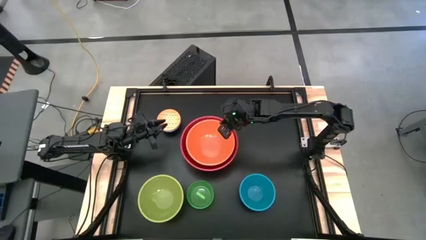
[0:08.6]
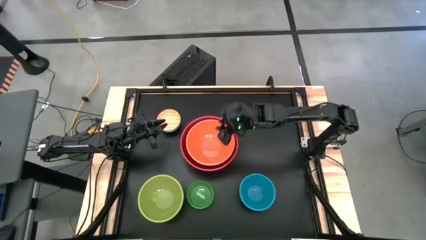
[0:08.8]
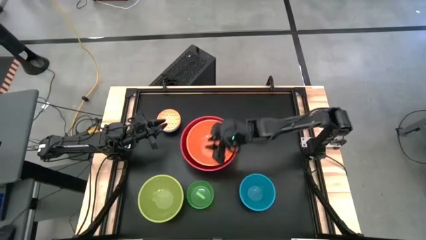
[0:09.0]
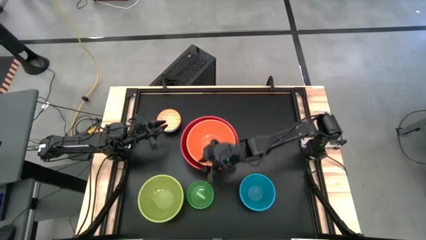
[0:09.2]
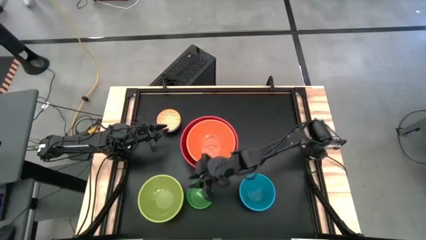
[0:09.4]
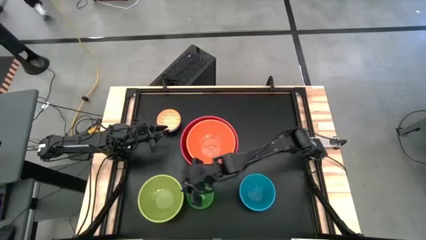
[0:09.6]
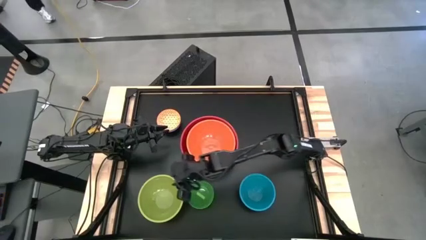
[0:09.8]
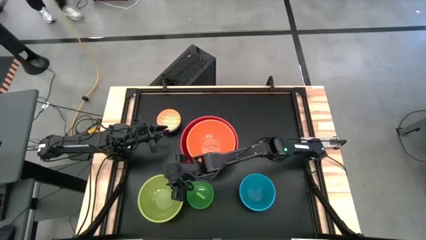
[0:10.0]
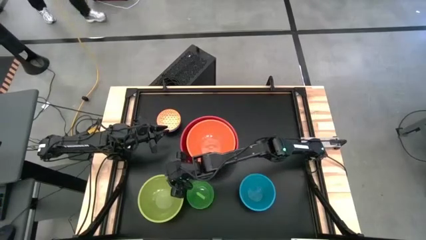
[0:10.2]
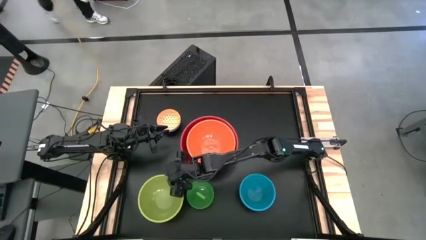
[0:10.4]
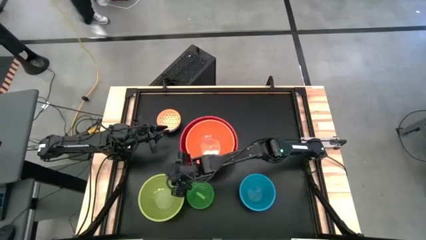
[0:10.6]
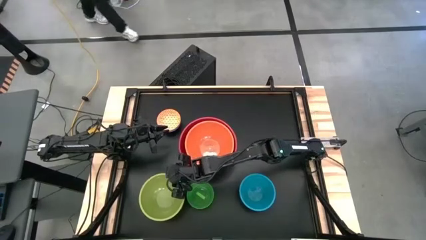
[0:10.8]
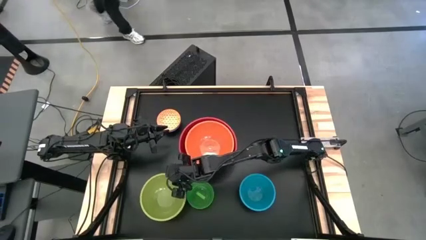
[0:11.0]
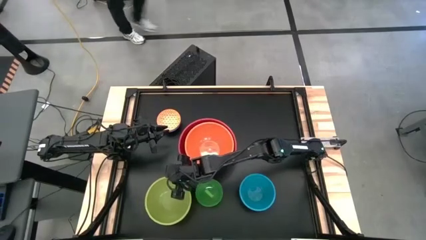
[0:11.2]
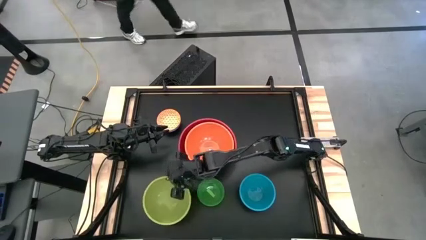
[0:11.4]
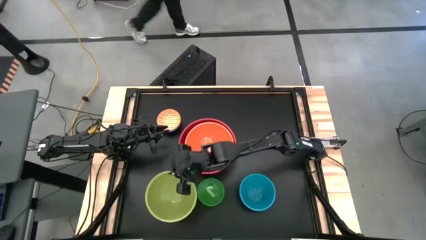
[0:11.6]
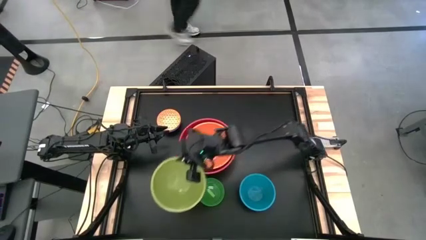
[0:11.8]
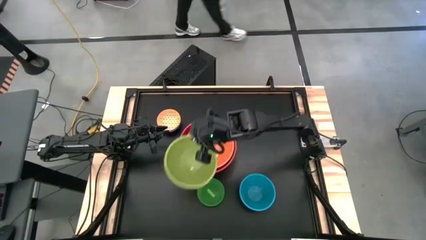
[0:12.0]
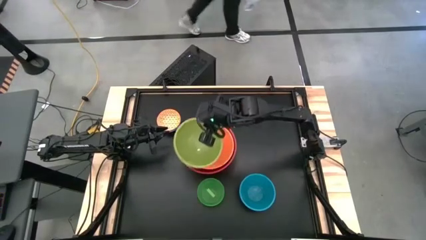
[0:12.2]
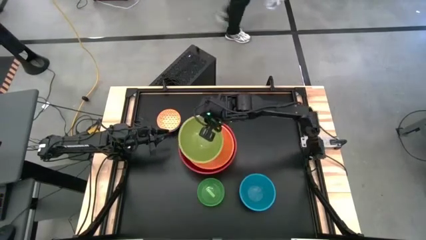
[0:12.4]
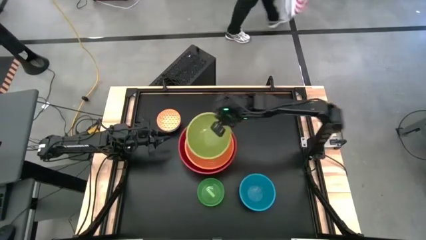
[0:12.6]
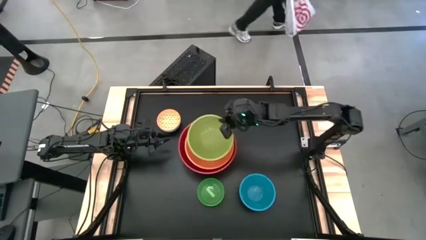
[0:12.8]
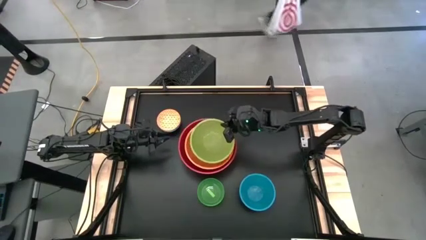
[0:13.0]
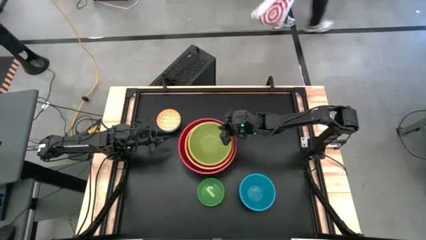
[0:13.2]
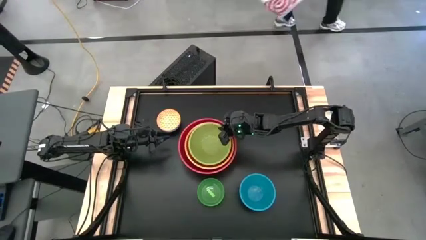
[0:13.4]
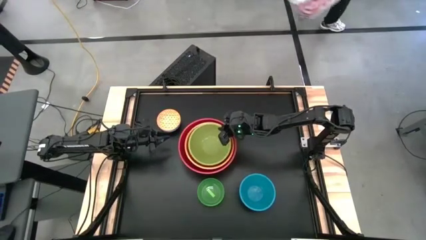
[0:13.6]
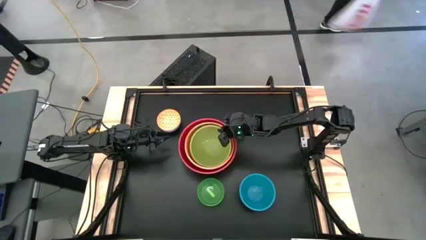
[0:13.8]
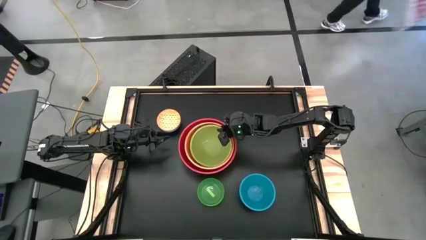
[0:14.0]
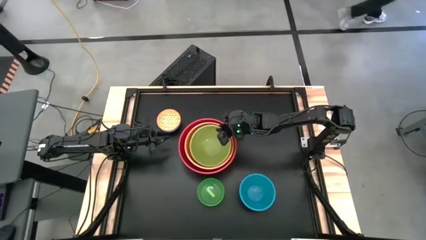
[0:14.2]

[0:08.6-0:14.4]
Stack the green bowl on top of the orange bowl

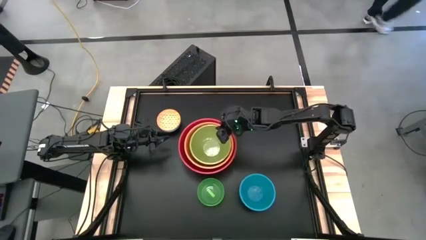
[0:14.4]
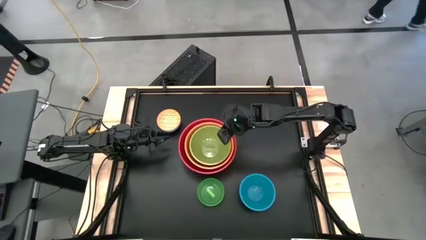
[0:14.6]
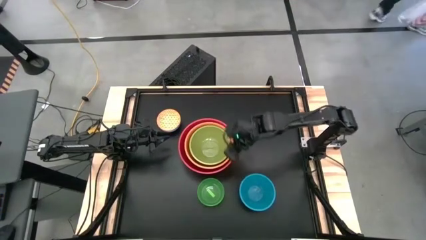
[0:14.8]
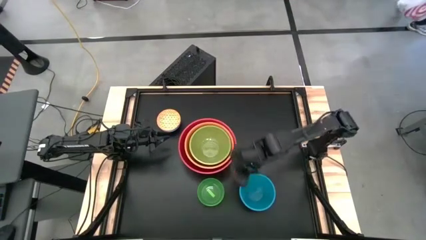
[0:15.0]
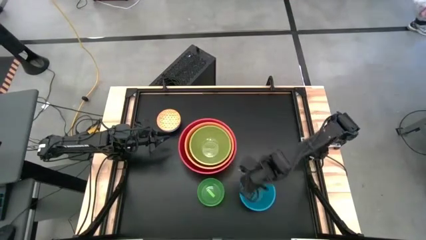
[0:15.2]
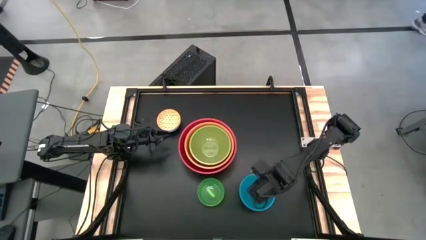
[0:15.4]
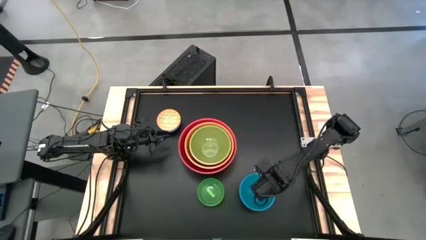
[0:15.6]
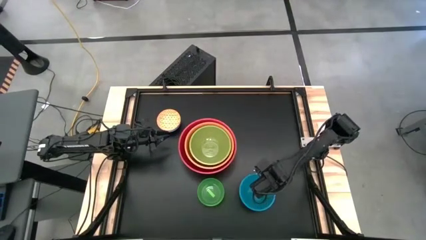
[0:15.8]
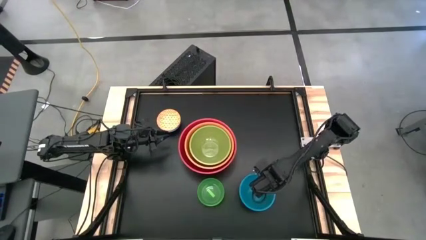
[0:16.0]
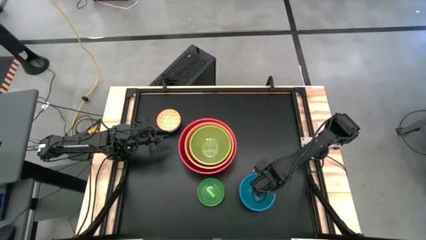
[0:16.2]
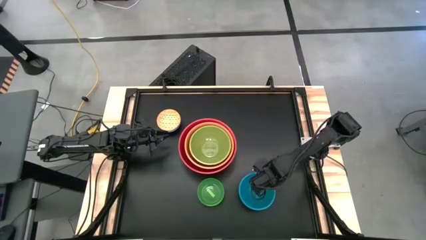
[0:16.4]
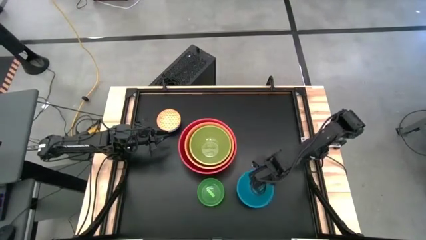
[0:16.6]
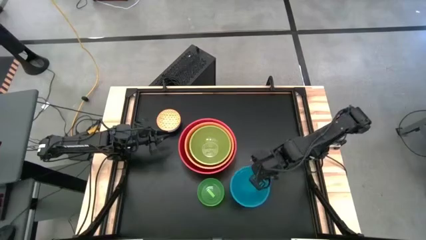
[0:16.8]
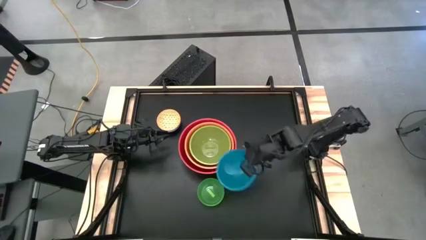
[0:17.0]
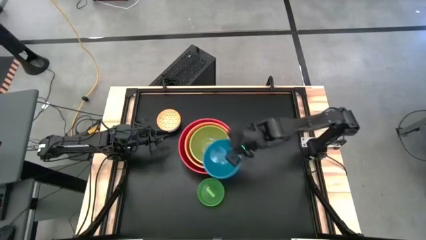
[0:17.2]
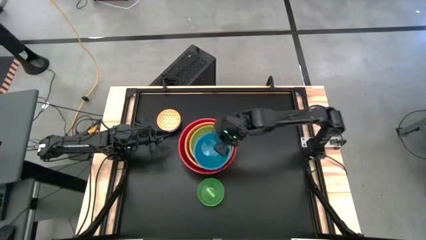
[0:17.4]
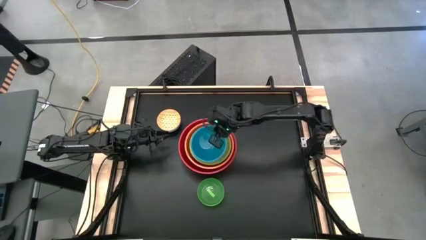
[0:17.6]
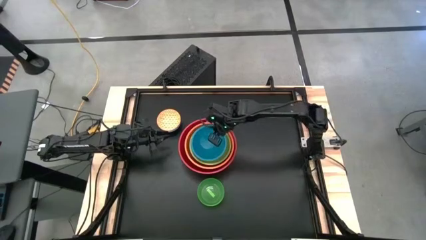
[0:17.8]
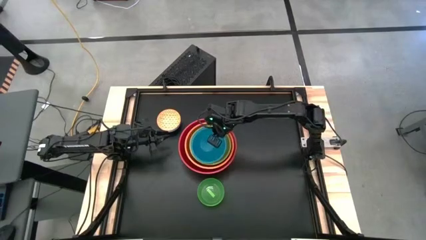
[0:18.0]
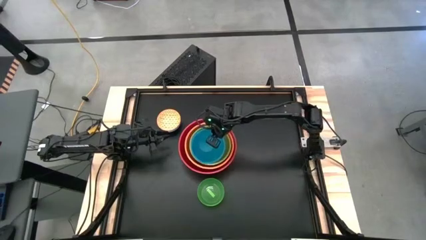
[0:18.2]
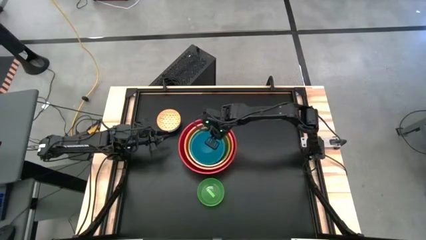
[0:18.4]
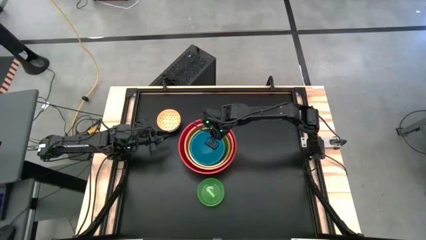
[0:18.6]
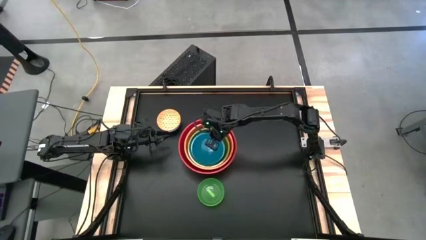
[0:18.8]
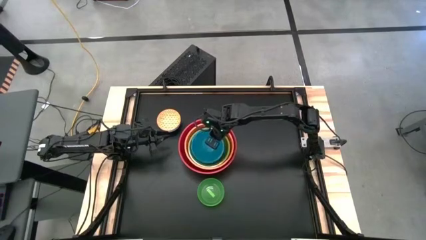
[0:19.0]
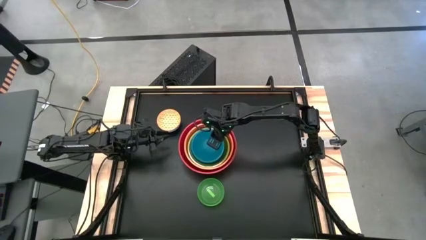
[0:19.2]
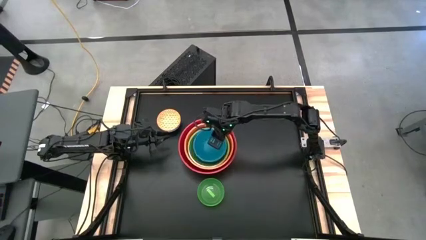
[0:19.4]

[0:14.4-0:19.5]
Stack the blue bowl on top of the green bowl

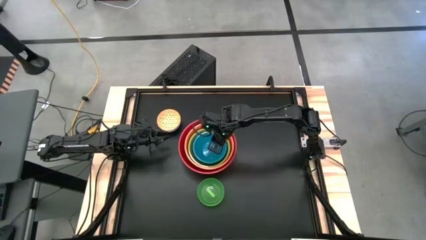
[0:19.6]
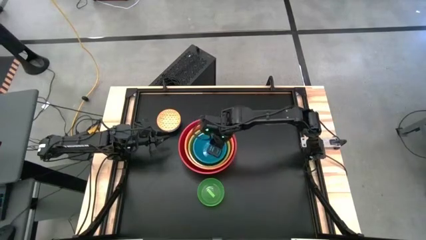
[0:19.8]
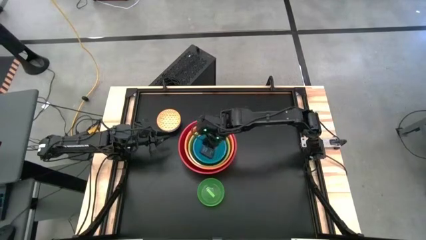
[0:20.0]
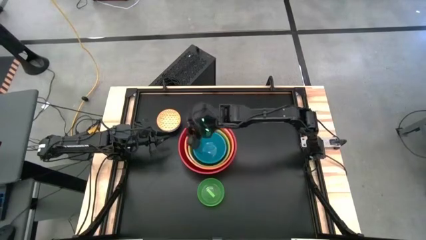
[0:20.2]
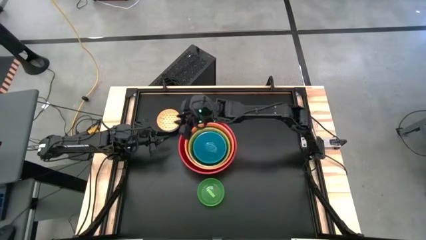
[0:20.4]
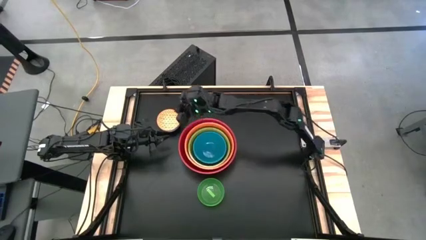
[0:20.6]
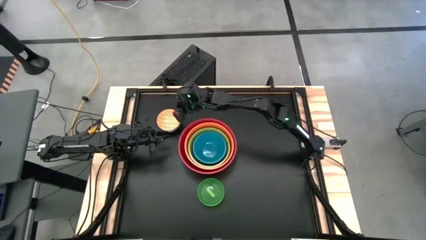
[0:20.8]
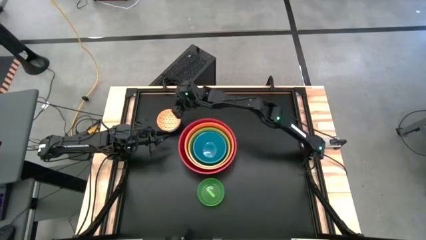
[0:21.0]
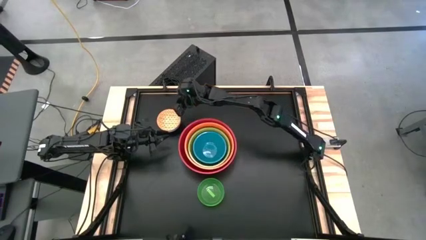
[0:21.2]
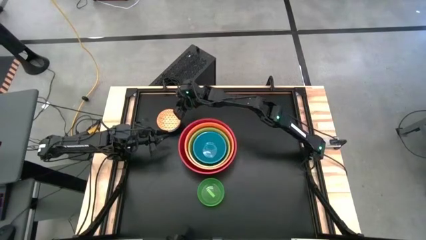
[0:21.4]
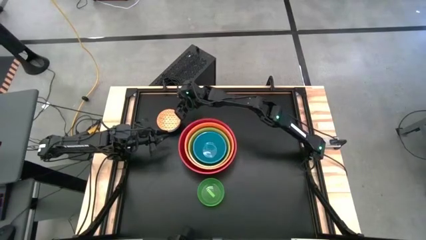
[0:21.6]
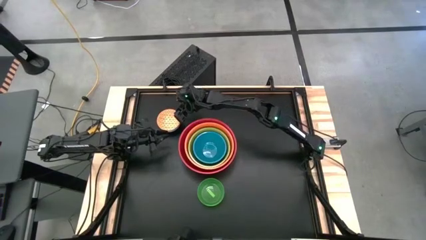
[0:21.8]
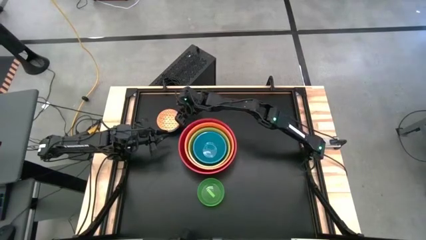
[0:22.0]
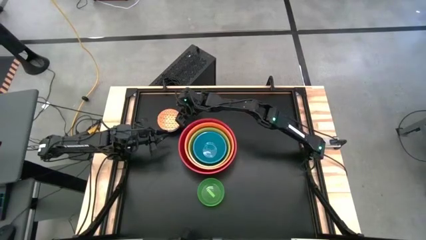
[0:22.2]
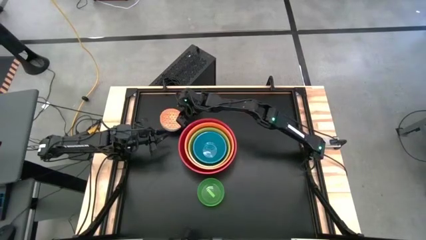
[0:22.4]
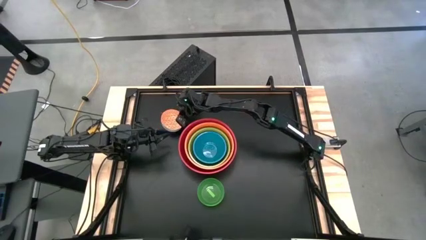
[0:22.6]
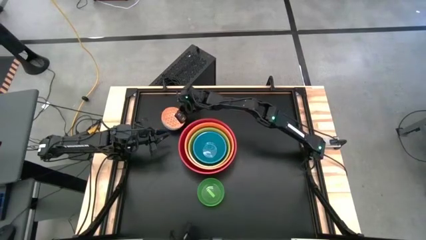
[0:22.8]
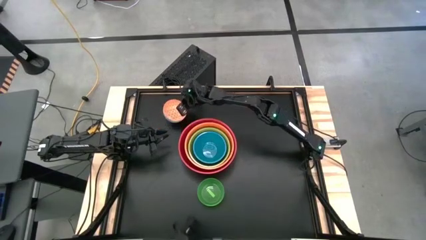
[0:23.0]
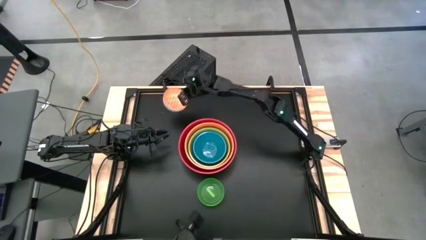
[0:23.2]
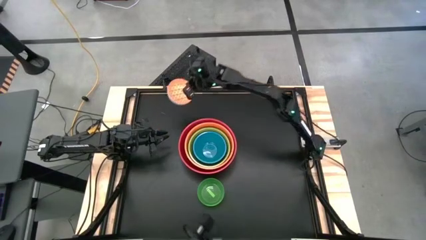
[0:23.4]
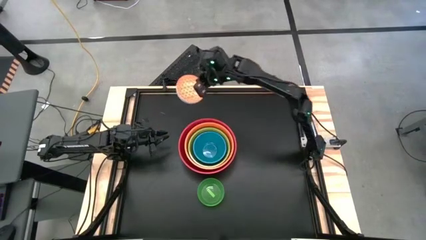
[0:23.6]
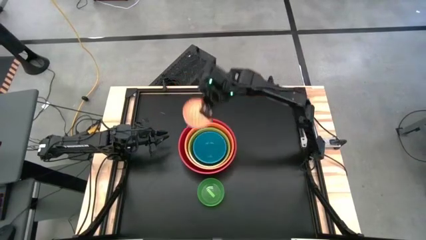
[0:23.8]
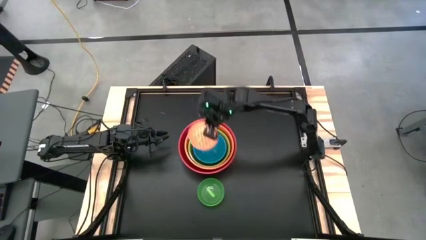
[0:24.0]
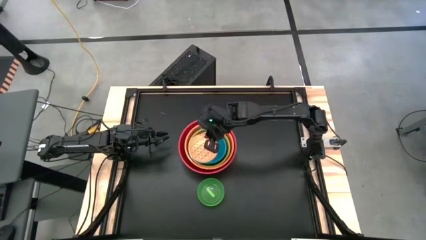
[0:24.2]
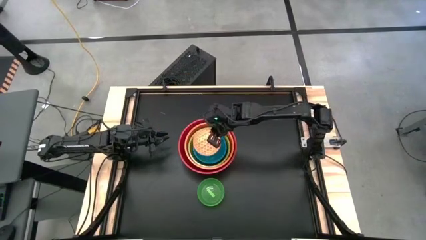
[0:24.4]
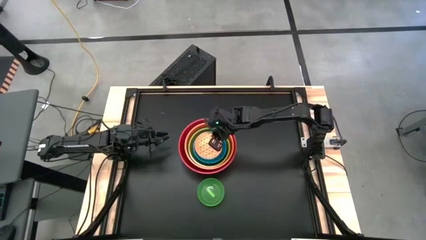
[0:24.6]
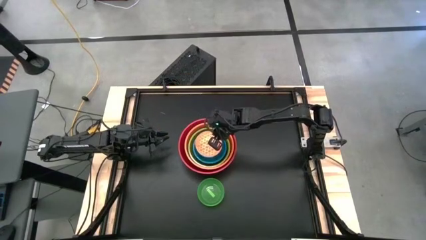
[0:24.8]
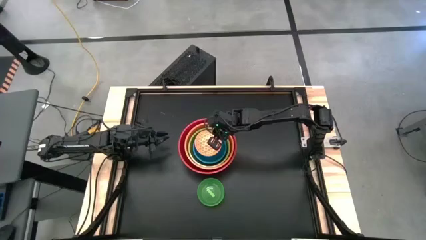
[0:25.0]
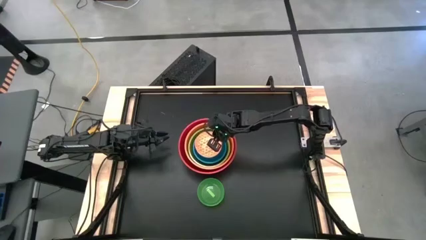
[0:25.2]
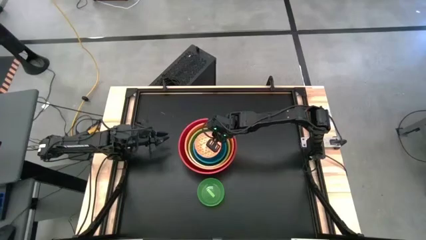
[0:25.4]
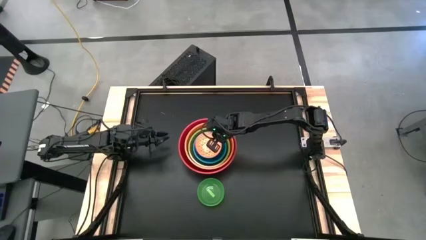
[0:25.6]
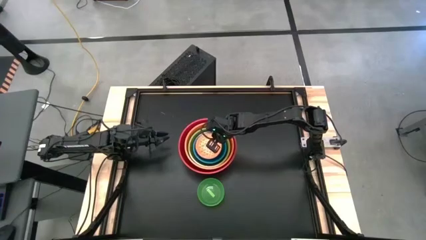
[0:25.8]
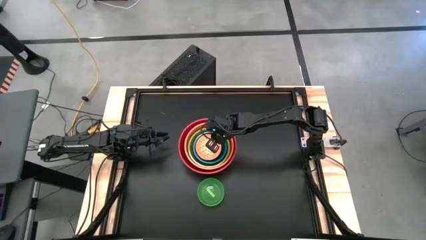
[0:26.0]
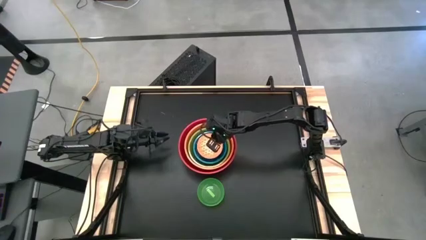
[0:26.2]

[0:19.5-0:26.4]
Stack the orange patterned bowl on top of the blue bowl
